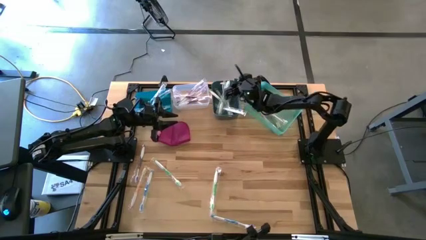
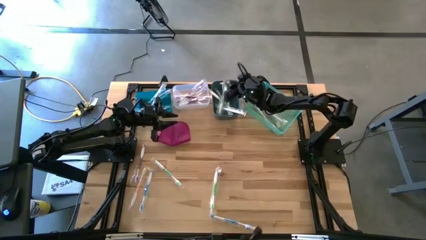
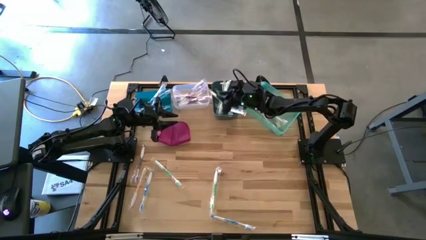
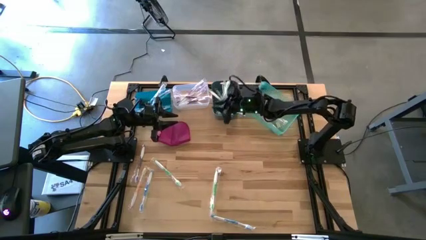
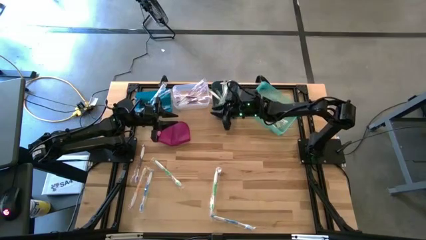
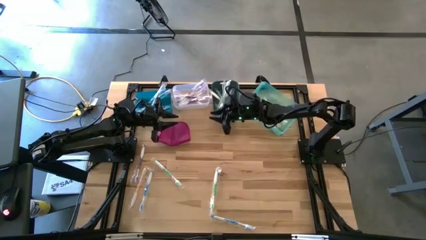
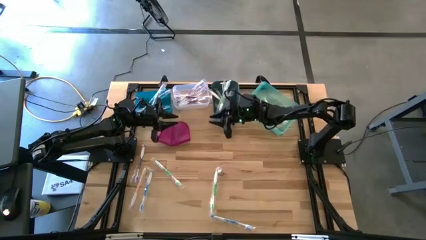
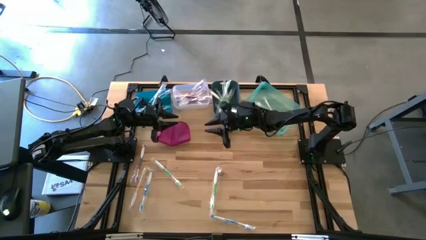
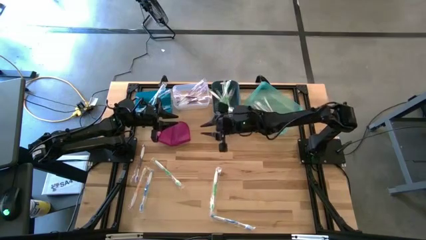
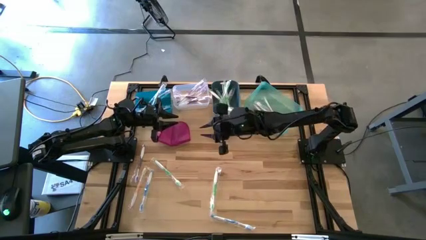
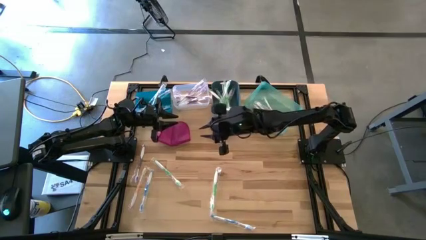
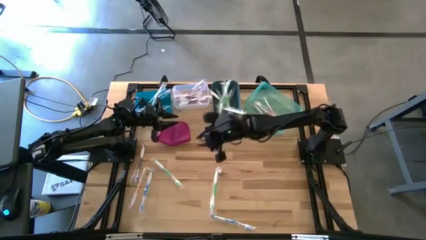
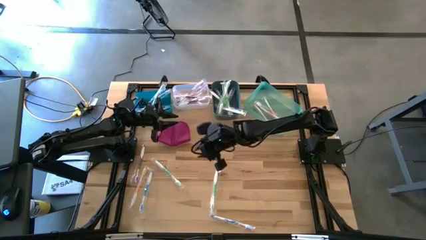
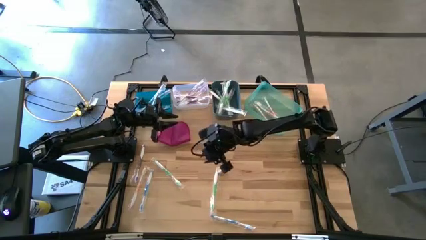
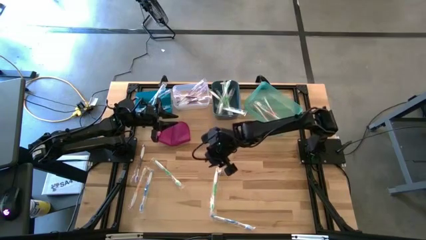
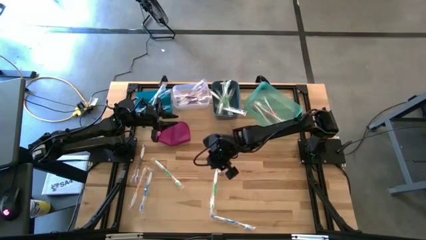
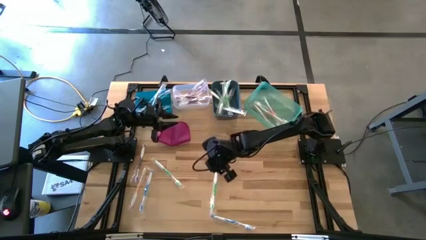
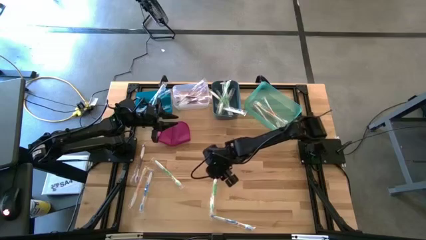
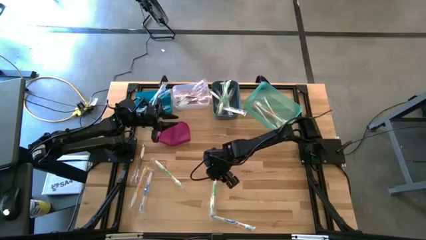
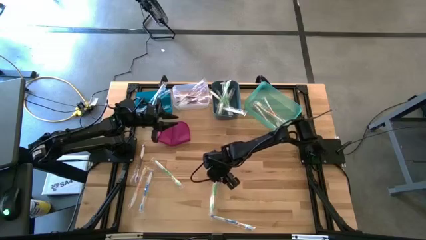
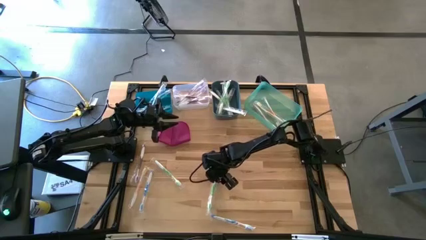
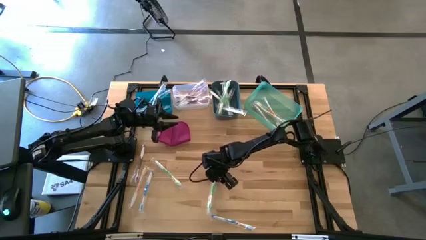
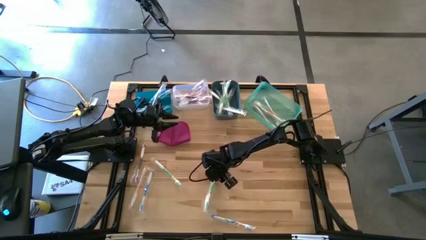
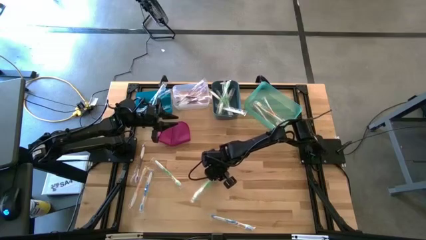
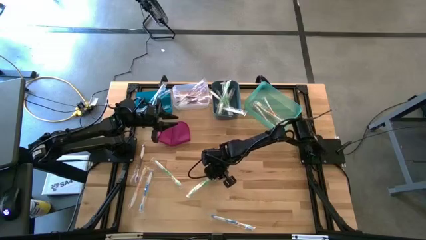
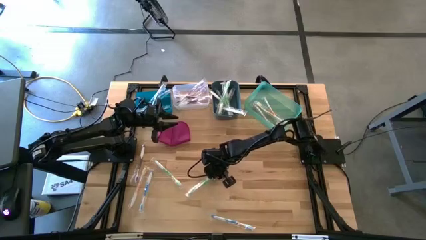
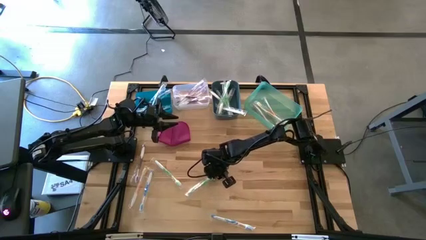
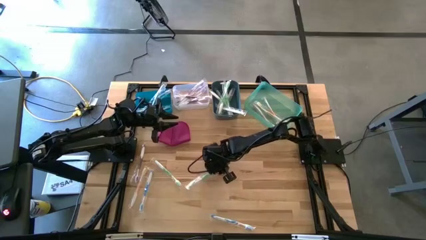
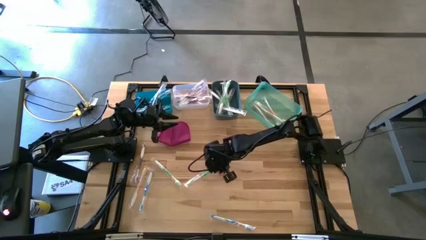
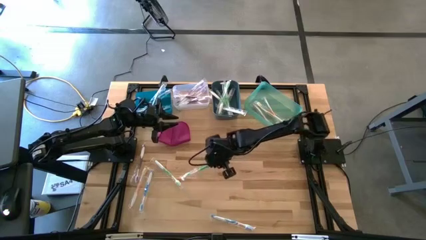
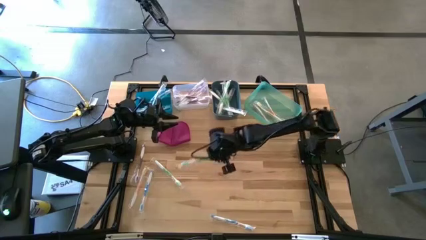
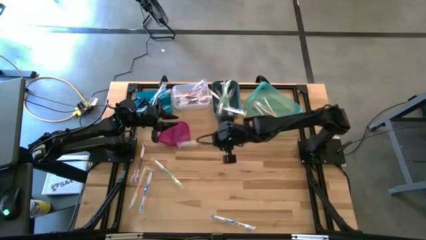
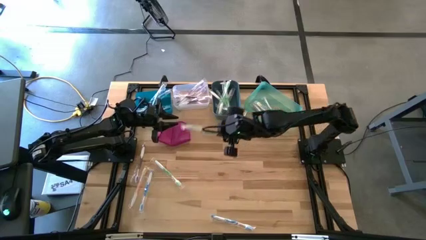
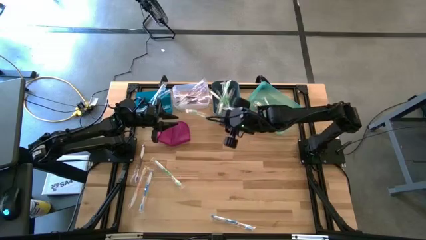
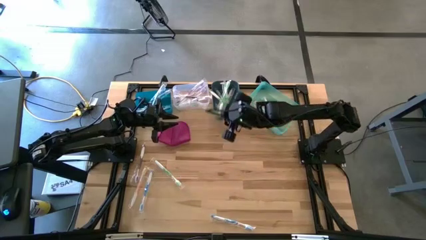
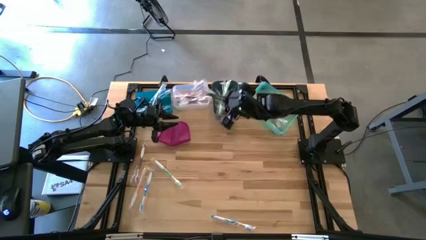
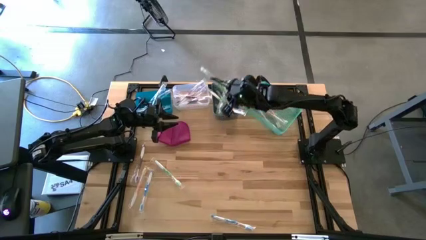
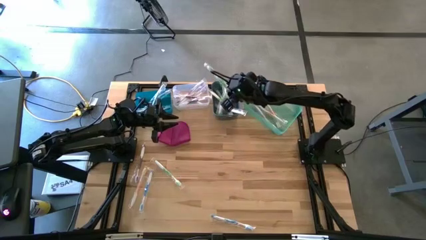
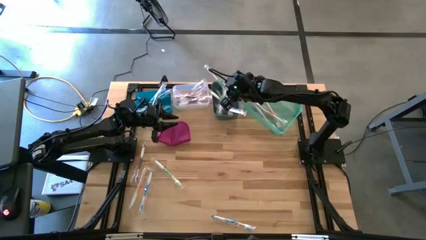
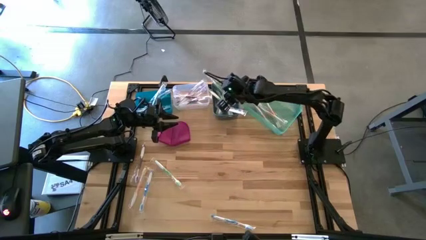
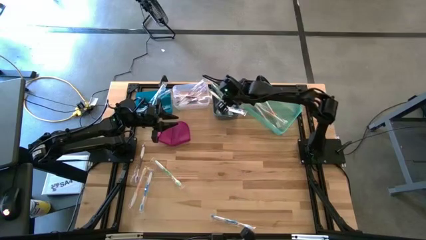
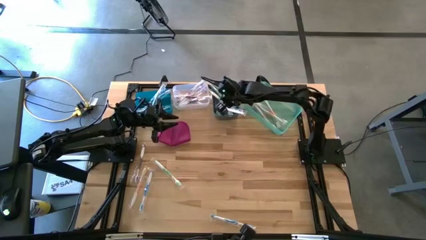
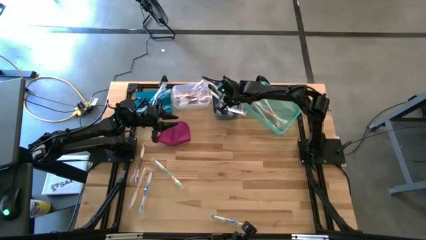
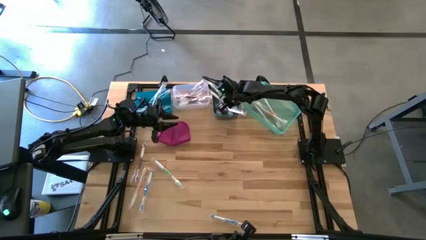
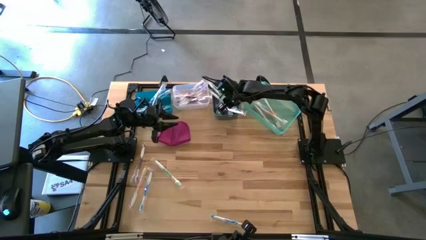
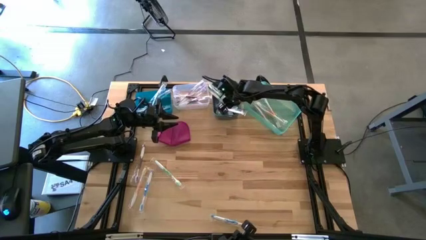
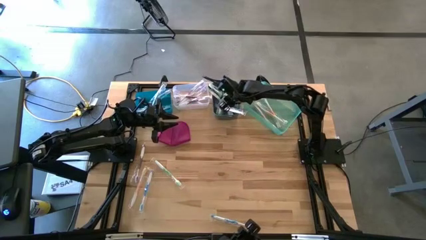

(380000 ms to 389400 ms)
Task: Pick & Place Toothbrushes
Put the green toothbrush into the dark blue bin

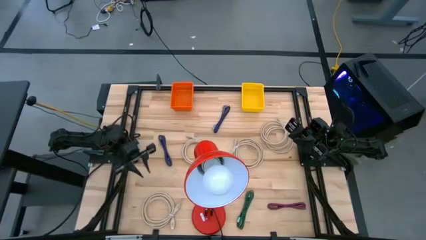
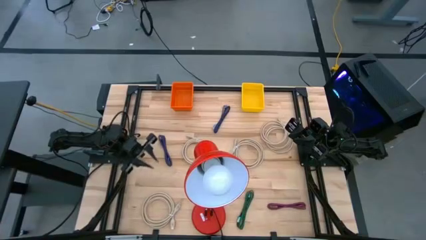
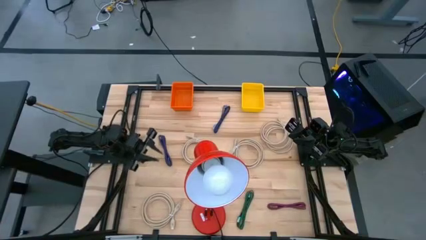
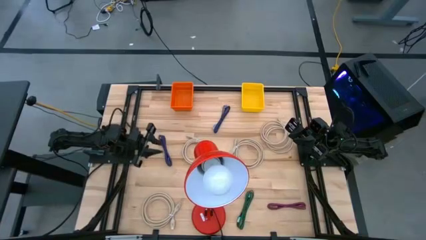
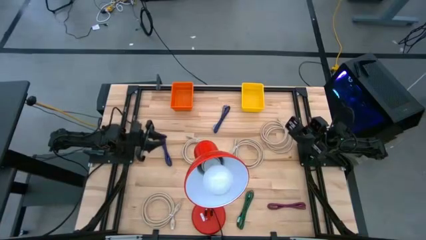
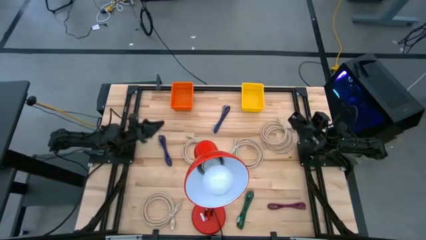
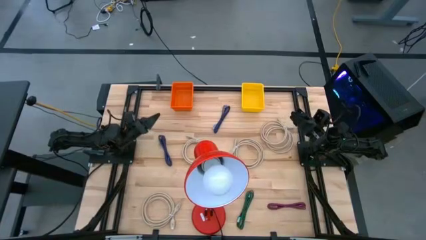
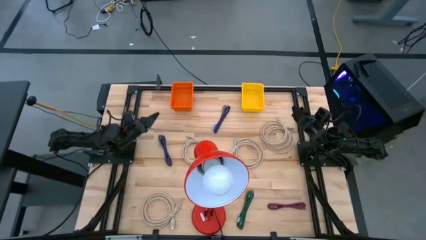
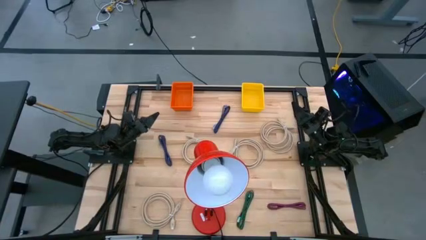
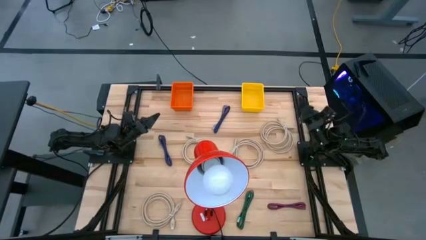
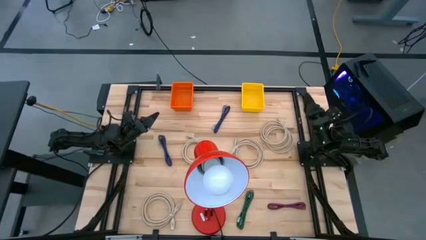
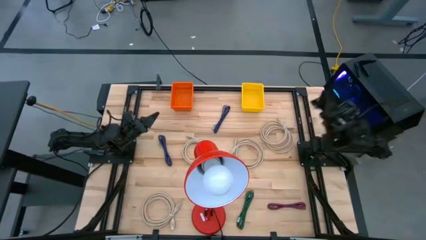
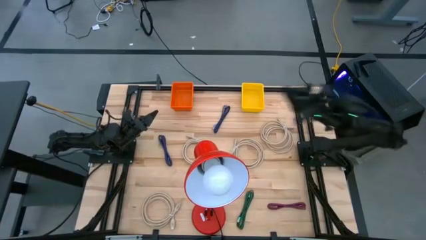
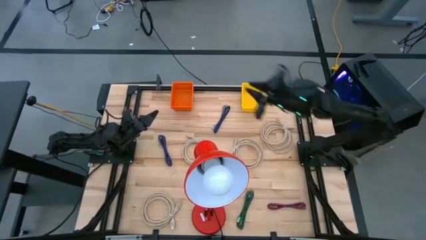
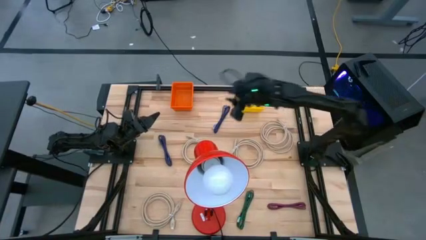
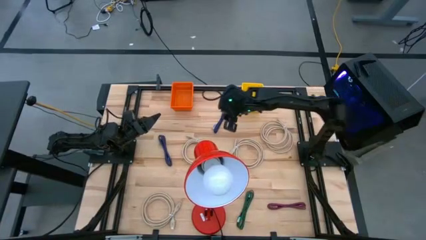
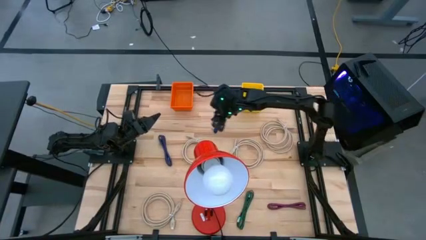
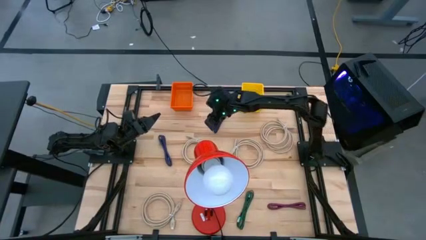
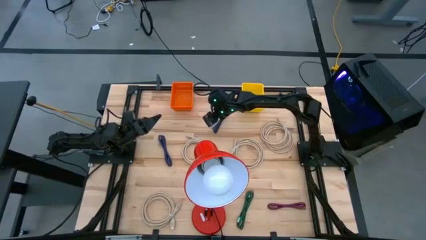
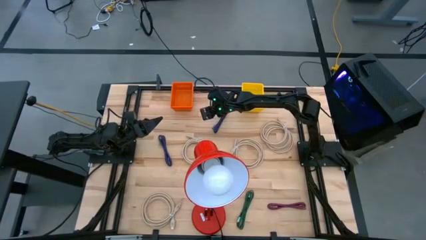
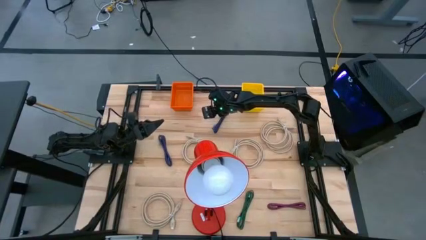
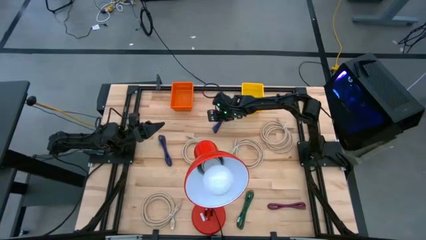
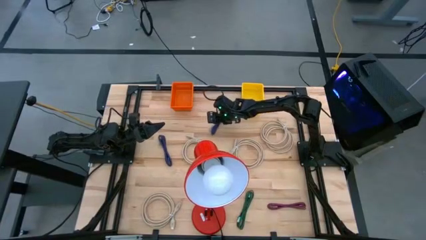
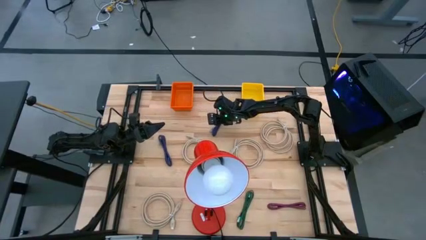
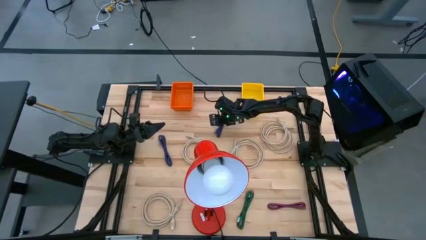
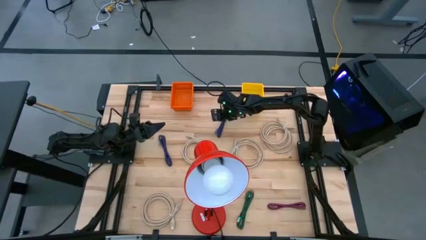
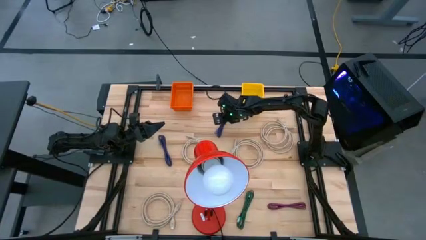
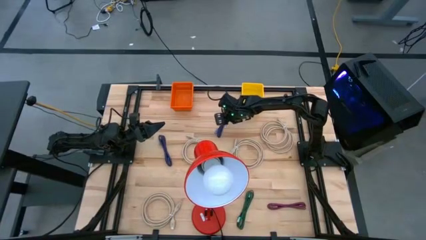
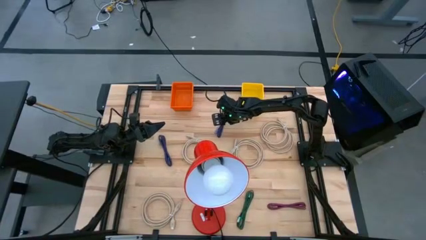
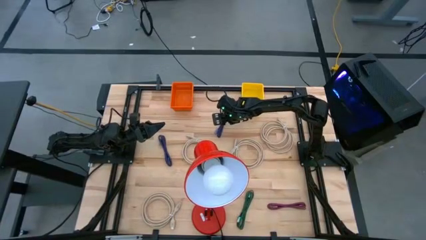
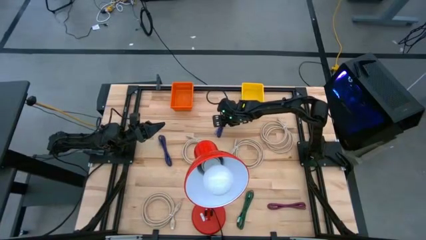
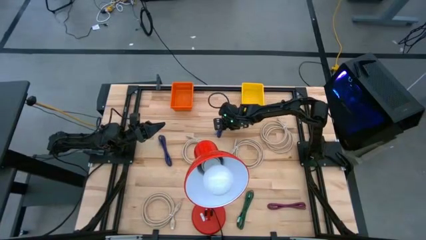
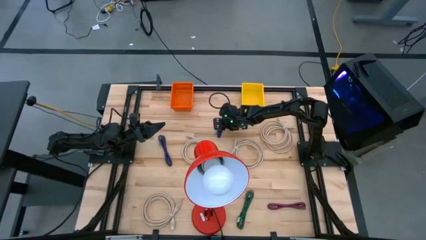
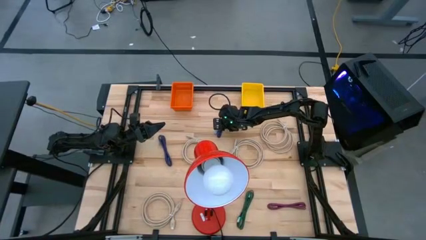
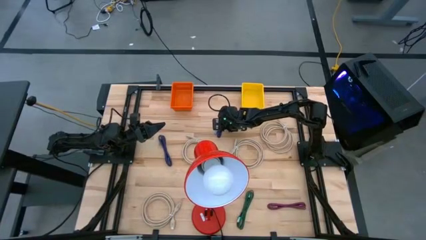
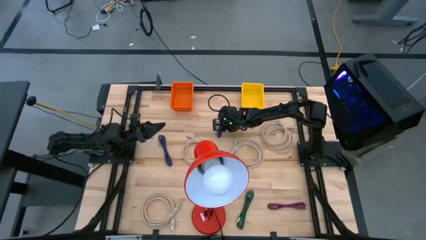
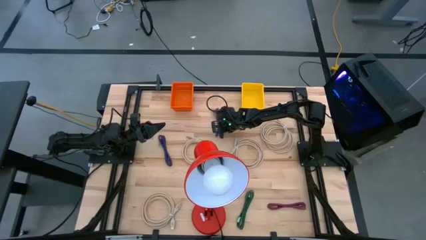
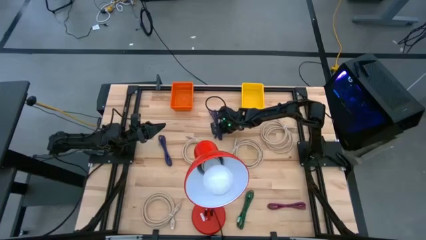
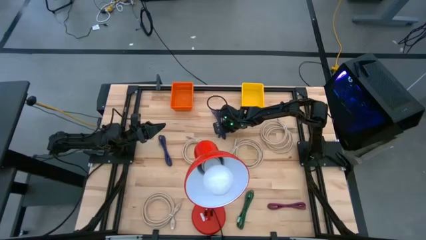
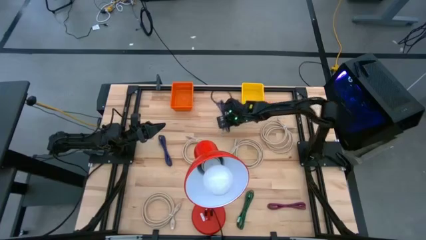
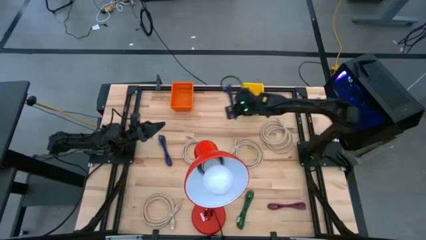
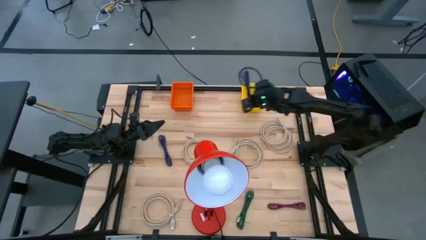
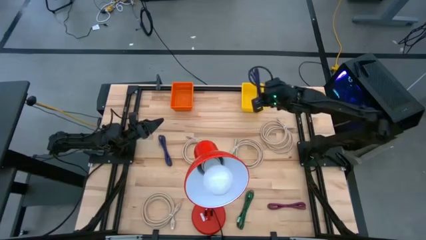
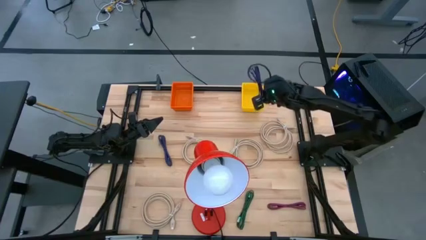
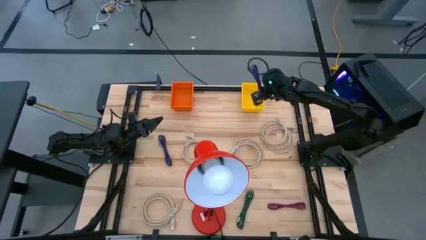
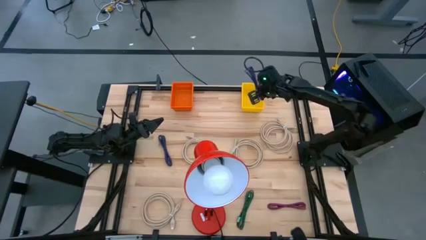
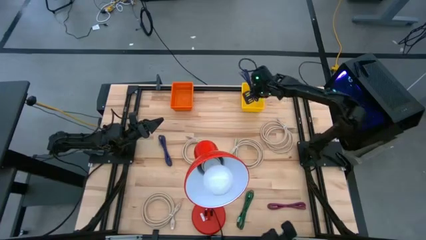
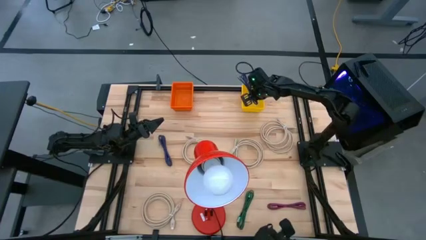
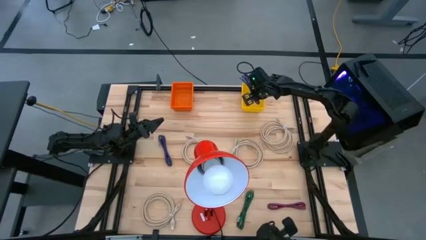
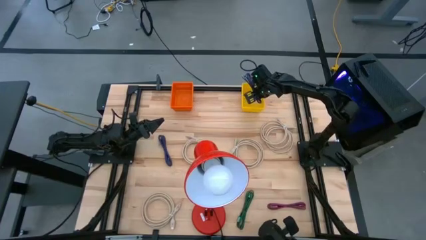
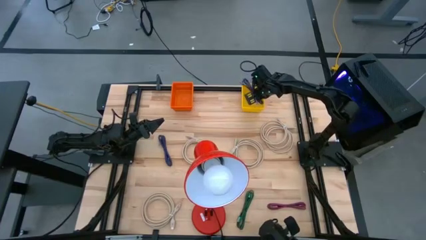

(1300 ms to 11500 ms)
Task: Pick & Place USB Port
Put the blue USB cable into the yellow bin
